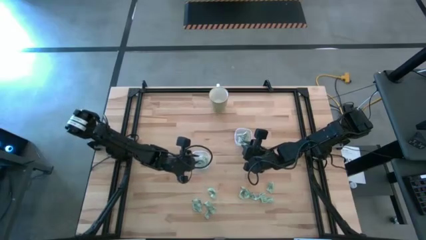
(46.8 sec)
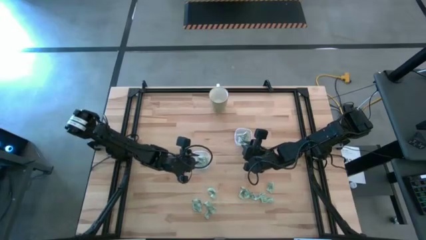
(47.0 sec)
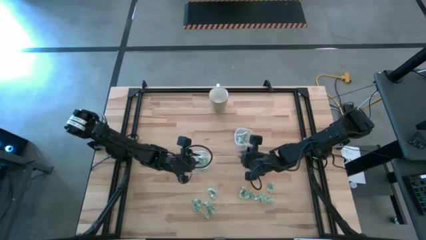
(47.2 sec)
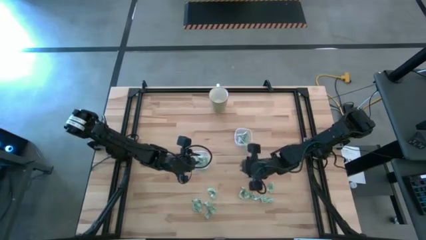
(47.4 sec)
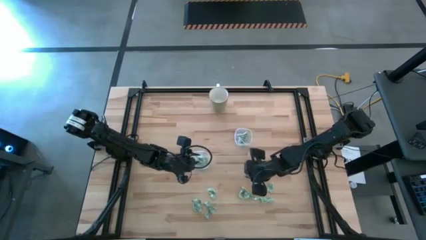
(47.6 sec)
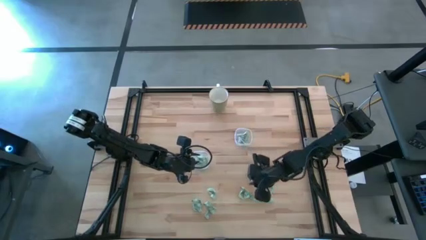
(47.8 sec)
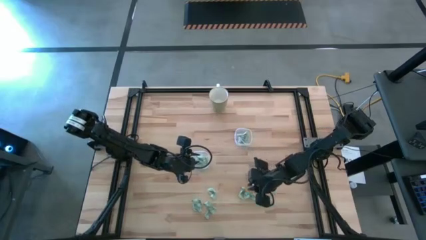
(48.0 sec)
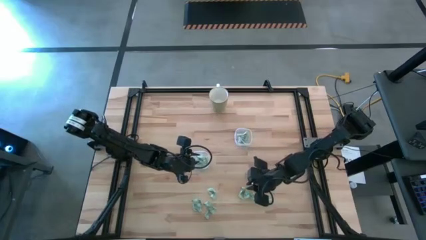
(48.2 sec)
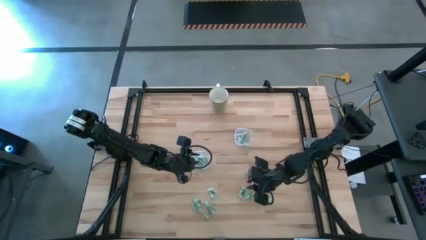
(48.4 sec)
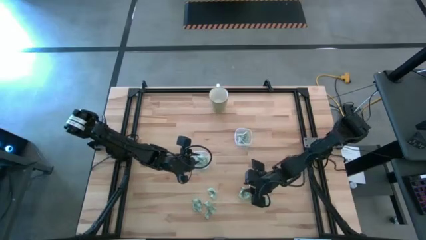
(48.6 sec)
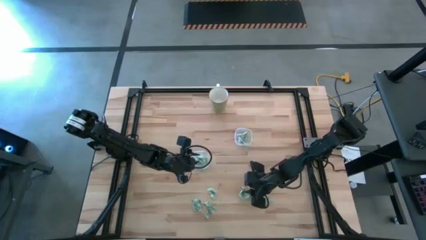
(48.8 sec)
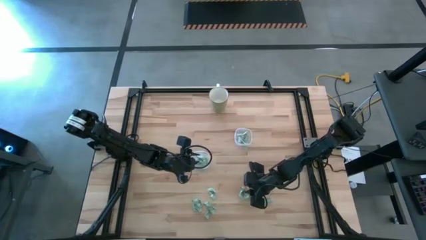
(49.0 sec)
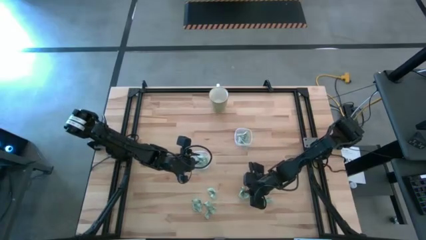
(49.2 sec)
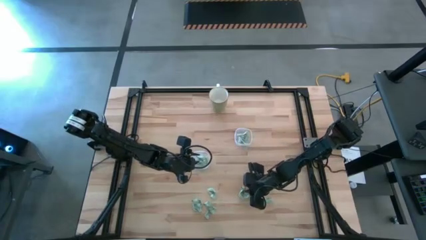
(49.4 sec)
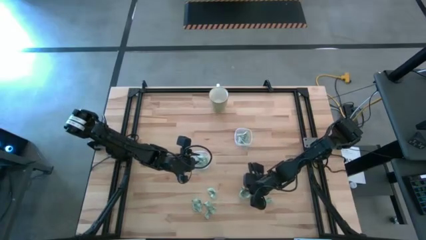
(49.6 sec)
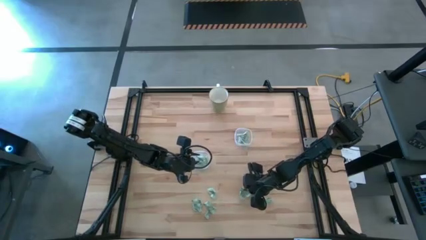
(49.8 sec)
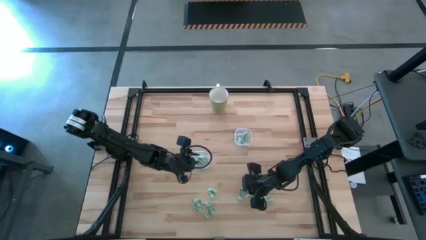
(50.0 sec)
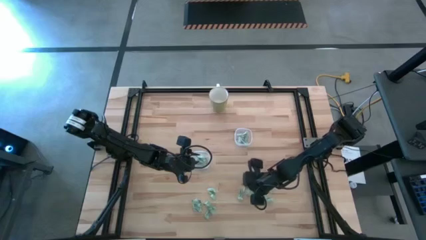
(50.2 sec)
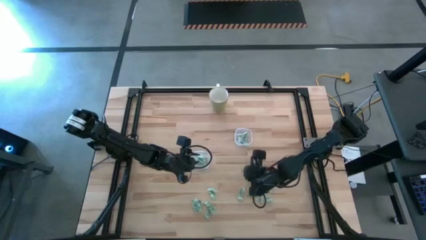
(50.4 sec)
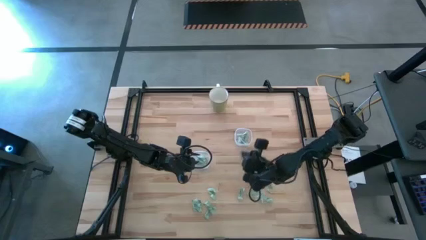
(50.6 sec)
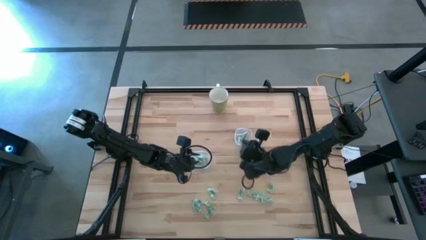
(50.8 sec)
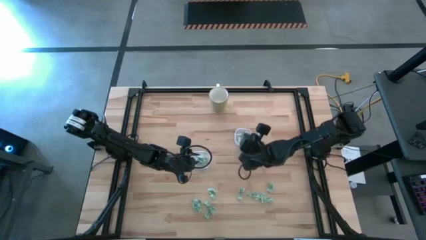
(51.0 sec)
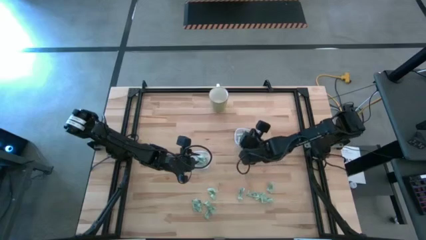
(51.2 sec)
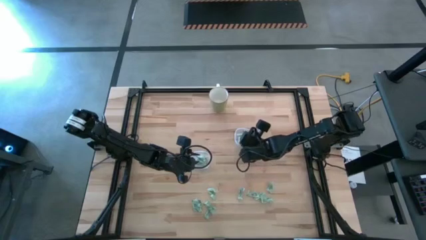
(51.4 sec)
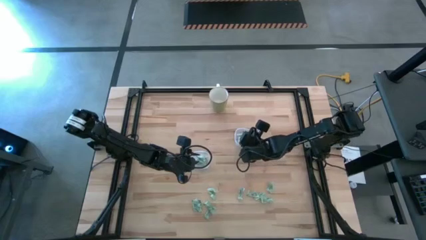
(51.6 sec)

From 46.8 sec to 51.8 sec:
Task: Pick and place Stevia / Truvia into bins
Put the green stevia packet into the right transparent container

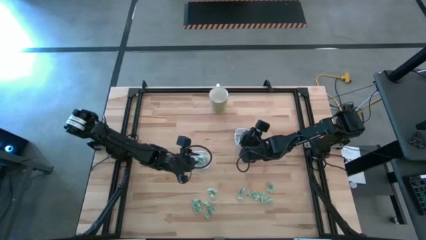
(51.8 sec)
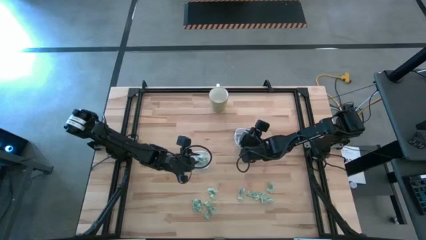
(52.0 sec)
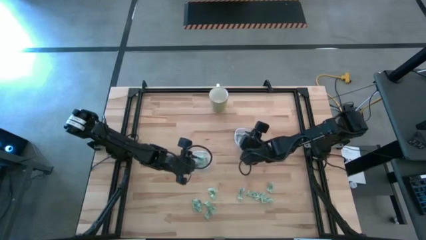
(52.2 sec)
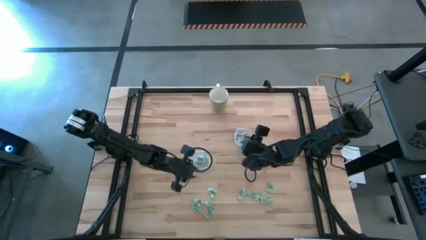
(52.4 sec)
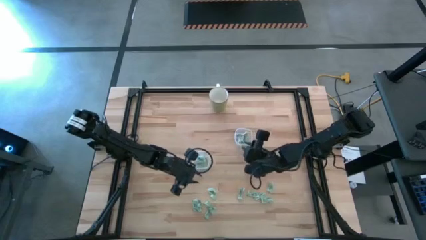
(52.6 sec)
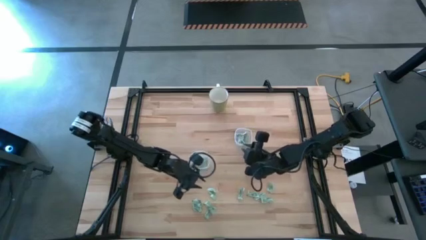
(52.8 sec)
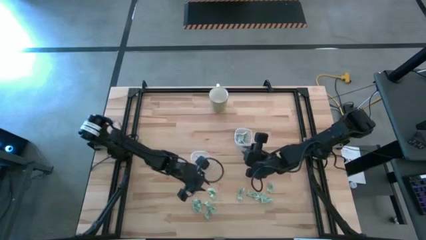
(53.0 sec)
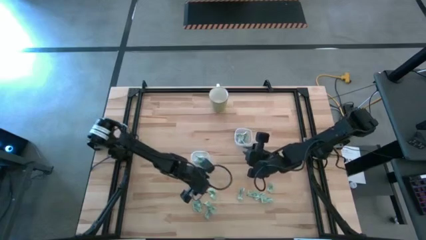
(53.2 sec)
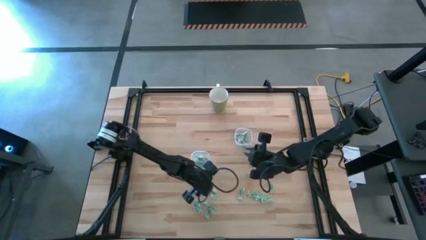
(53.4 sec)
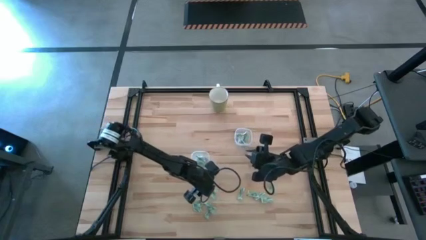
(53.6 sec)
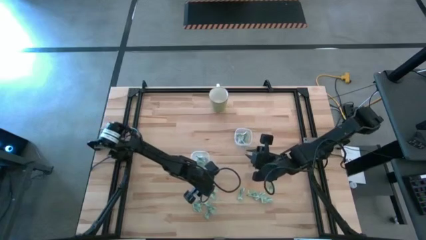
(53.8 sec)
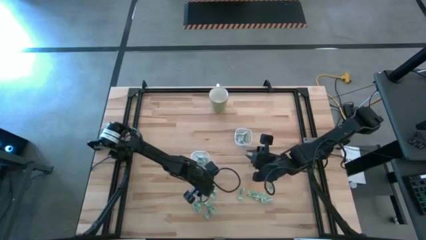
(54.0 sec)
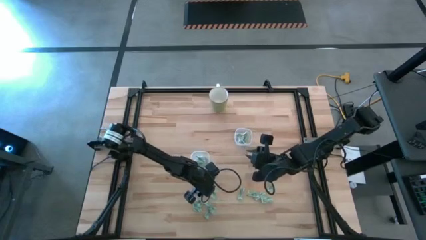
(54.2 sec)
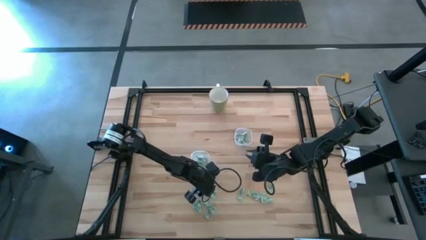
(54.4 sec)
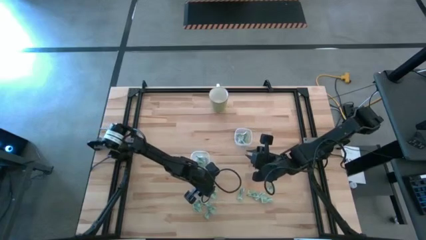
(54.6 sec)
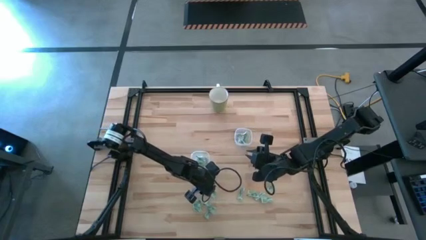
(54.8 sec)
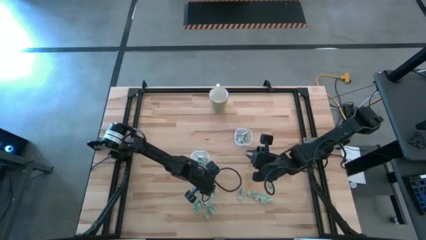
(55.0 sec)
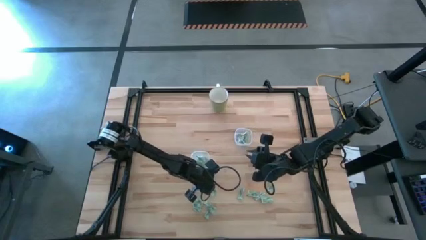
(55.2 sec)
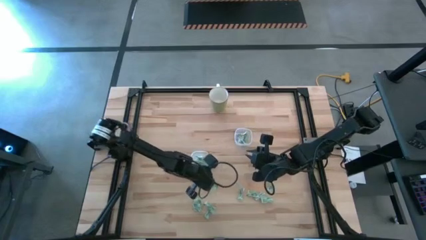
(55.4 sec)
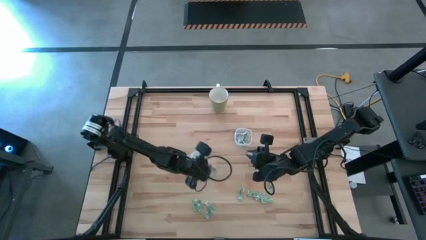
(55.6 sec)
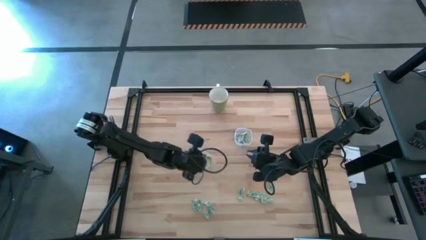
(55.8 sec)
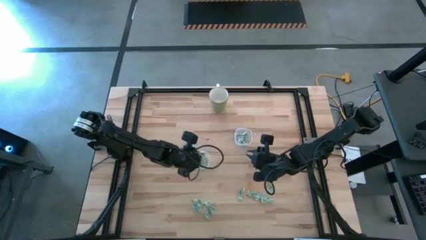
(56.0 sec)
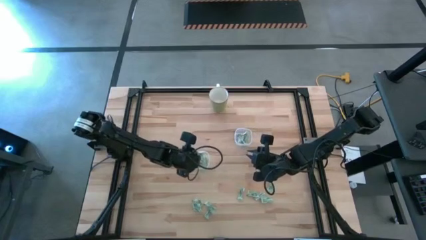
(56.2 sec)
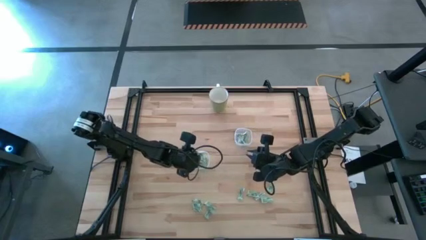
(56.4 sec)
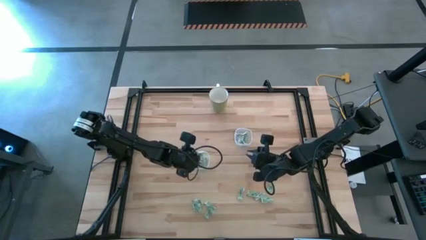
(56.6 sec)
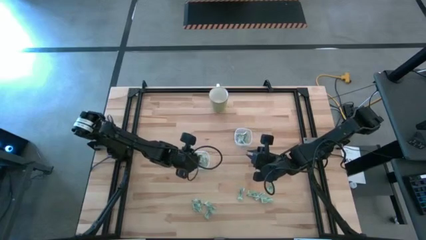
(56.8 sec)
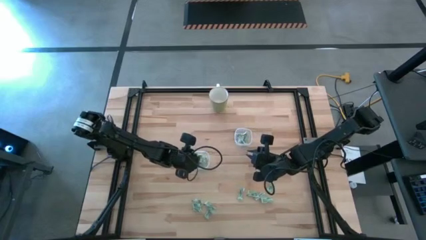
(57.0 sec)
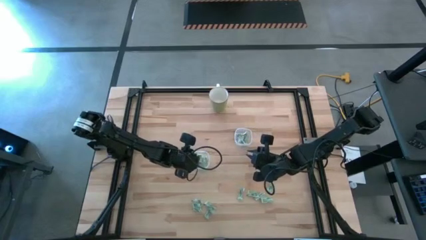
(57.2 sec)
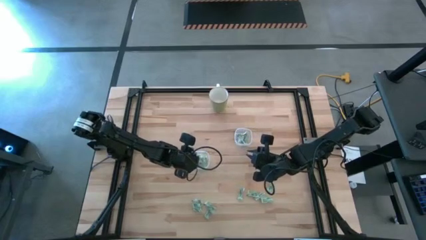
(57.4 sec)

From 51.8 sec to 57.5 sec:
Put the green stevia packet into the left transparent container

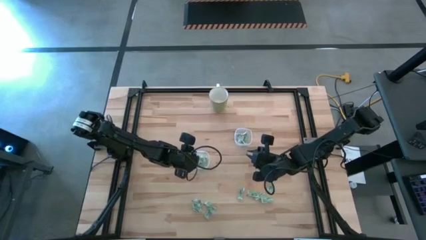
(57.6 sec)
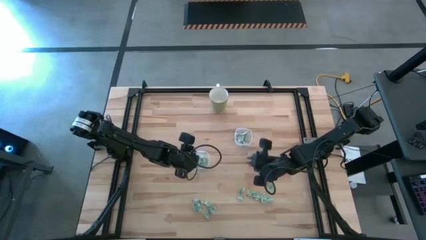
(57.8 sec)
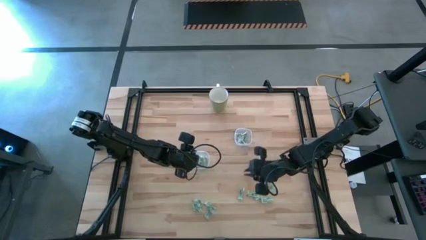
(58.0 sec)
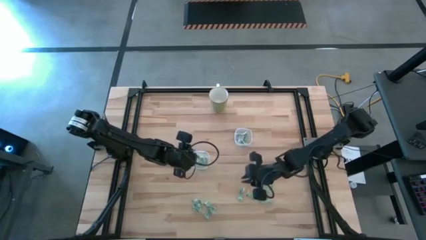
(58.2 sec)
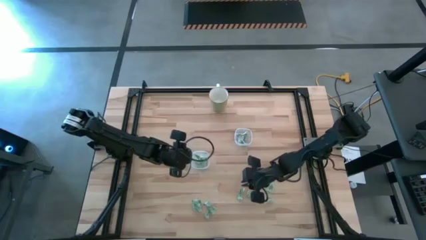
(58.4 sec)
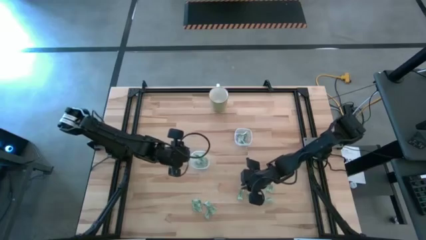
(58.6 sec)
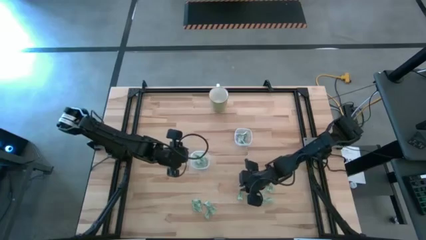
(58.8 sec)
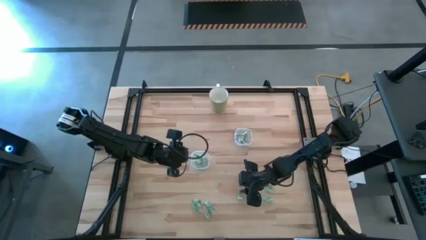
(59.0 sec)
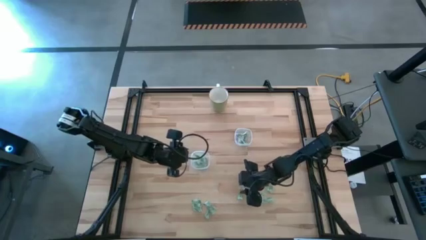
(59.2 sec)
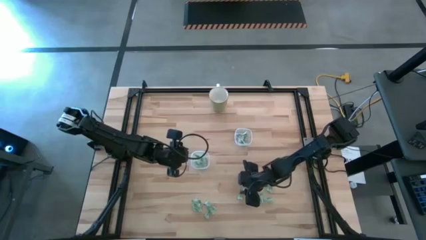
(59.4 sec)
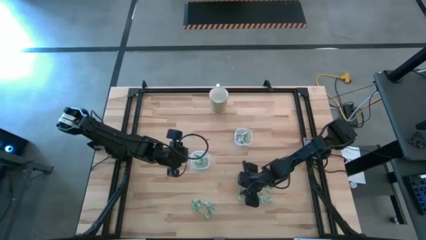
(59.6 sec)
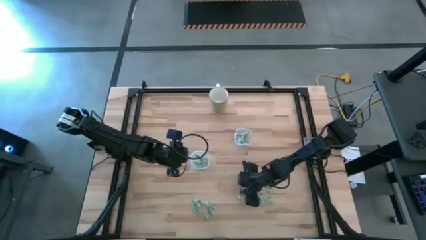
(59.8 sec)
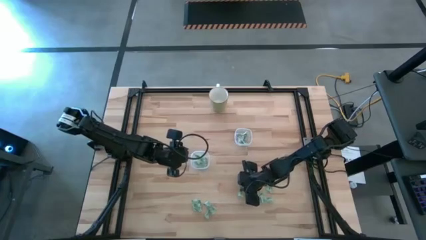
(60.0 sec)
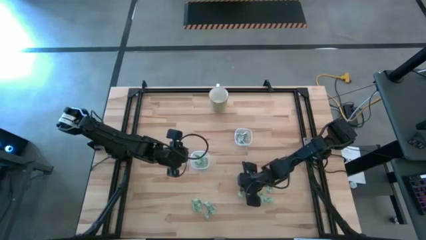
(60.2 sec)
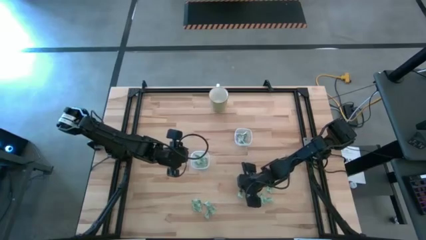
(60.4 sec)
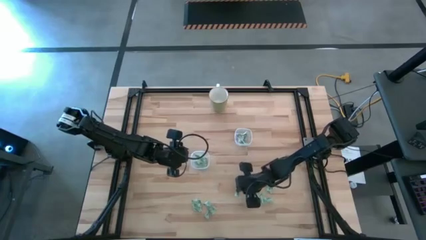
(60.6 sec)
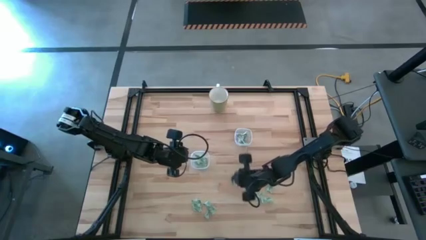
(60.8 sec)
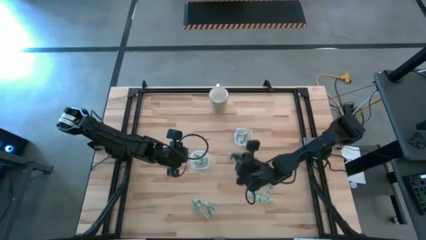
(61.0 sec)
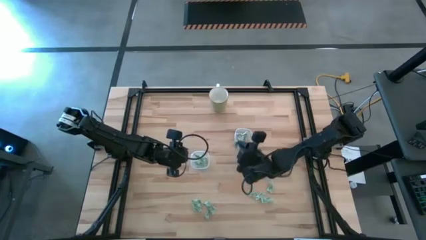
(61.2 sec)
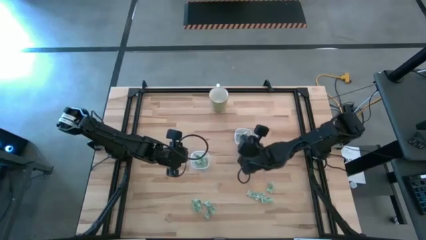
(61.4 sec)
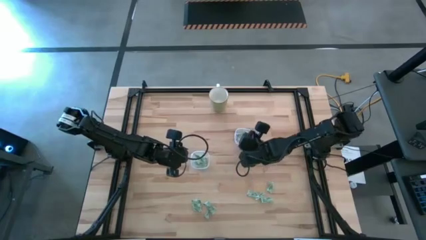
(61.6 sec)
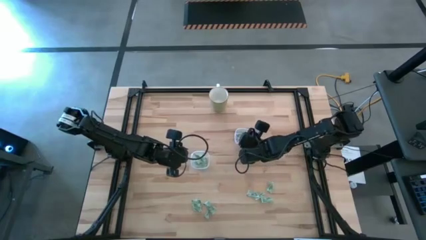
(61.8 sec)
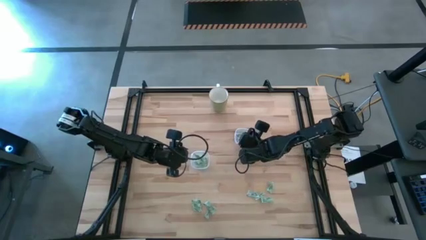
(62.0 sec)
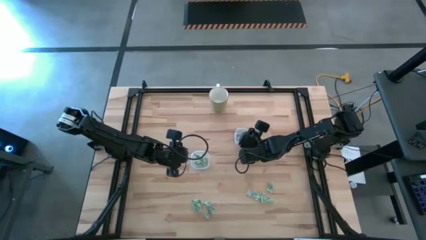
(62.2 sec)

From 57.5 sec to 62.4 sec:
Put the green stevia packet into the right transparent container

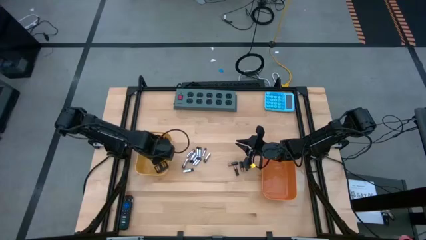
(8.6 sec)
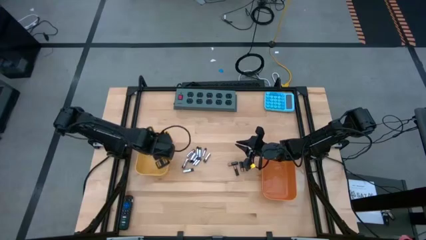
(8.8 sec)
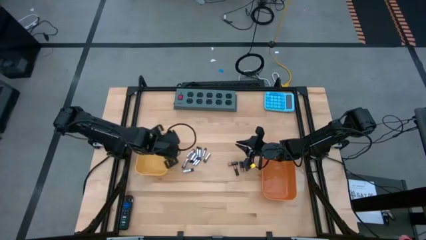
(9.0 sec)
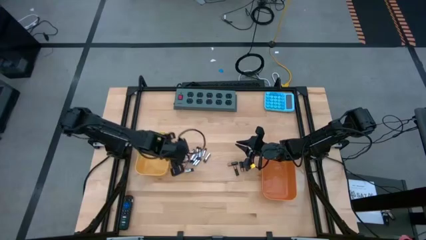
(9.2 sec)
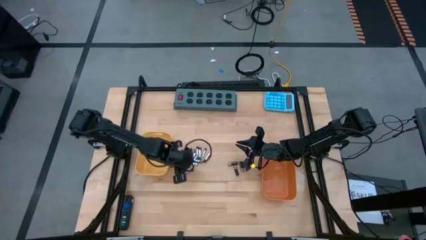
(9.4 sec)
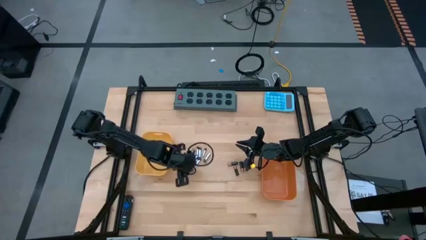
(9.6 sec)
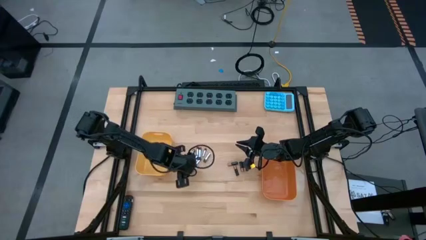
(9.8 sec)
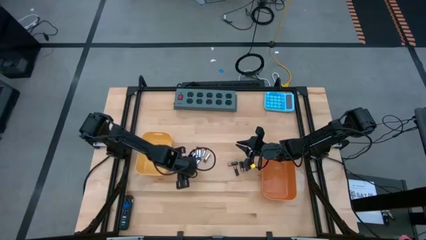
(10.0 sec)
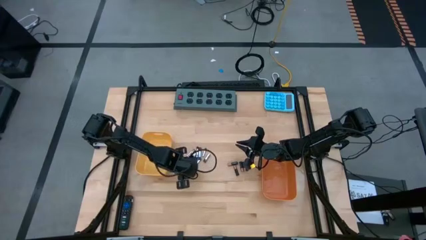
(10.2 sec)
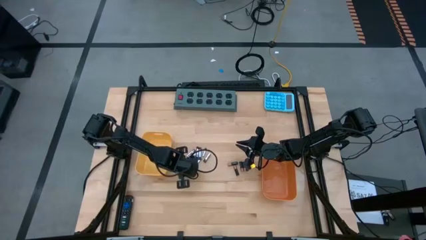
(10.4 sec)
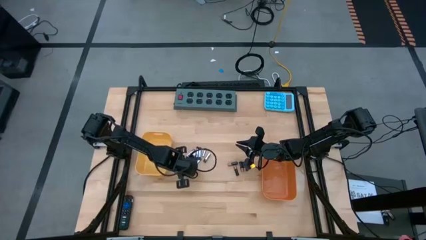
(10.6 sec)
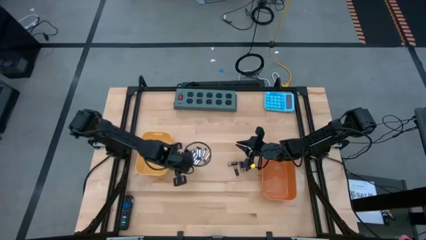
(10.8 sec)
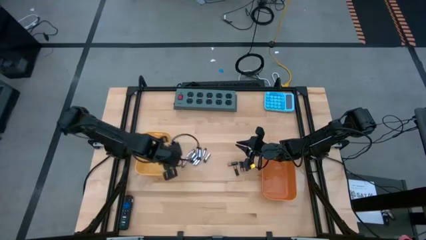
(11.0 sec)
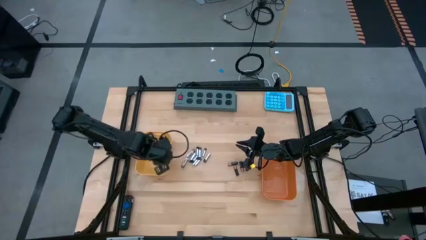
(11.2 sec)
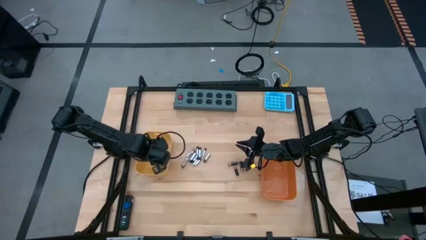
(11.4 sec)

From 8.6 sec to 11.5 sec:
Task: Sort batteries
Put the silver battery into the yellow bin
